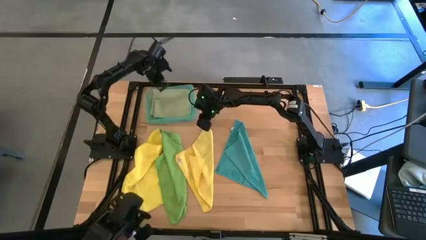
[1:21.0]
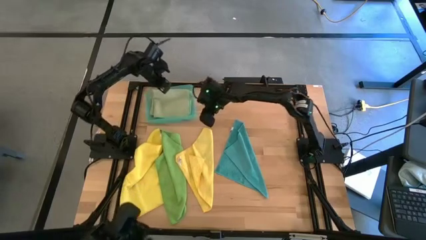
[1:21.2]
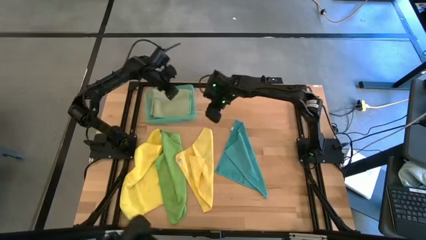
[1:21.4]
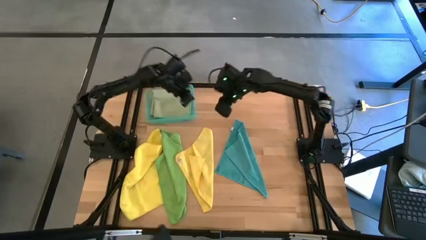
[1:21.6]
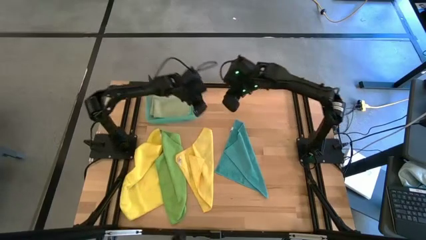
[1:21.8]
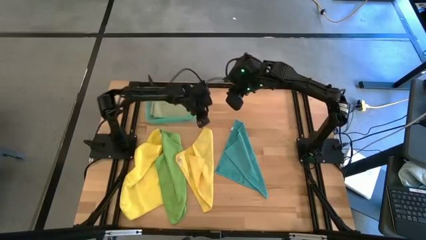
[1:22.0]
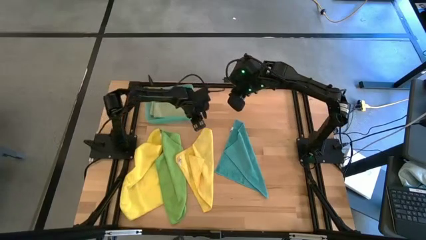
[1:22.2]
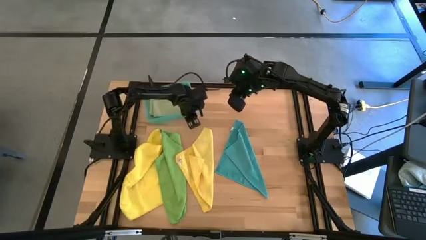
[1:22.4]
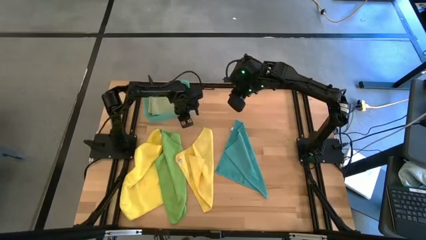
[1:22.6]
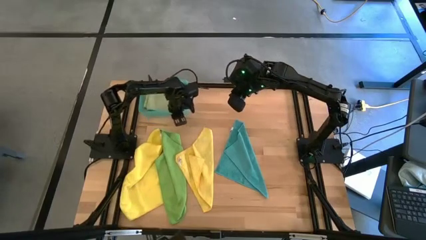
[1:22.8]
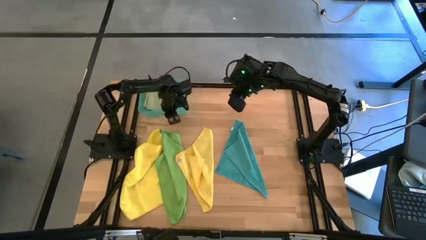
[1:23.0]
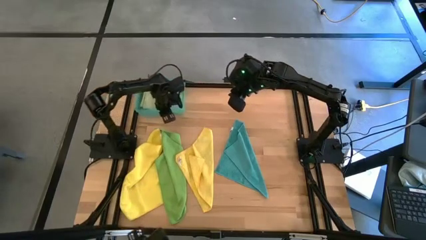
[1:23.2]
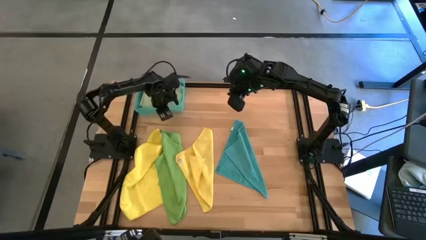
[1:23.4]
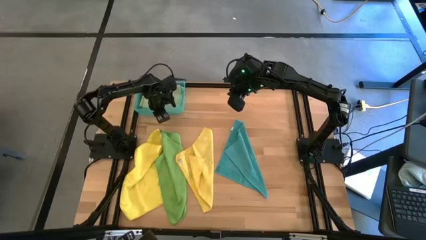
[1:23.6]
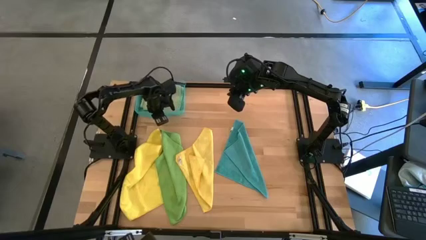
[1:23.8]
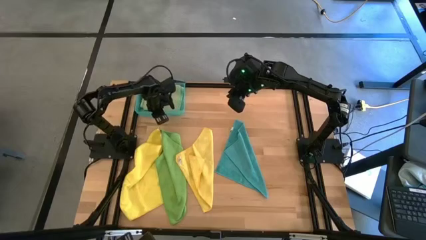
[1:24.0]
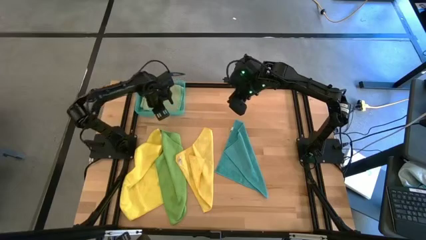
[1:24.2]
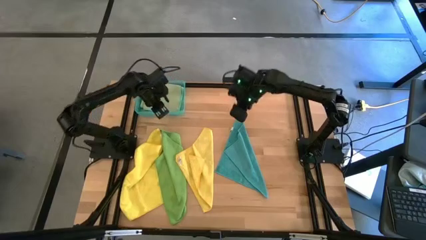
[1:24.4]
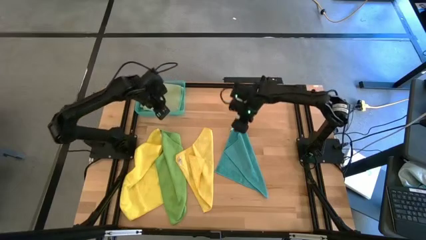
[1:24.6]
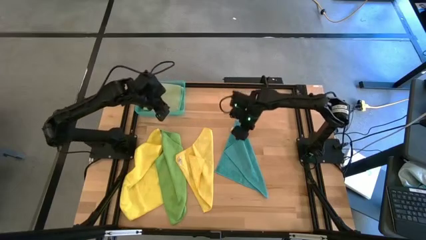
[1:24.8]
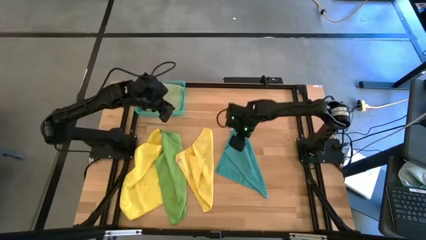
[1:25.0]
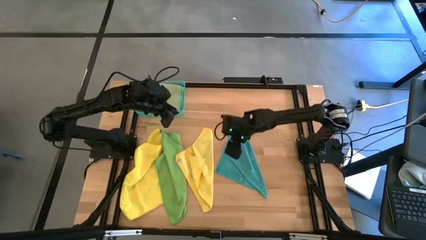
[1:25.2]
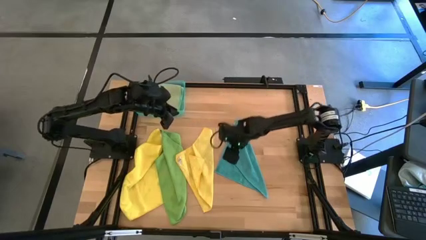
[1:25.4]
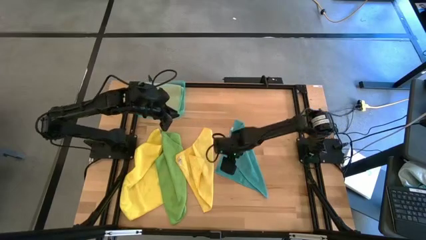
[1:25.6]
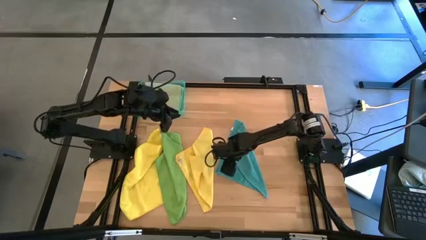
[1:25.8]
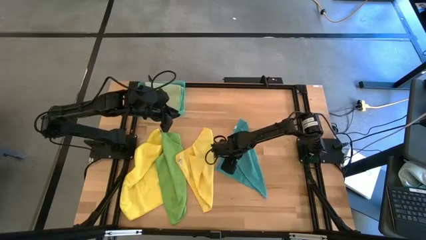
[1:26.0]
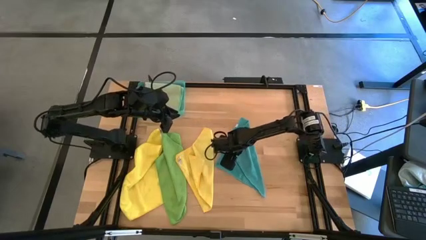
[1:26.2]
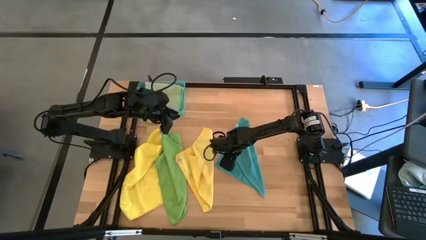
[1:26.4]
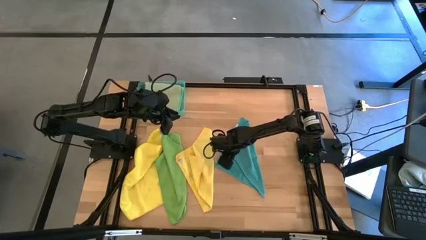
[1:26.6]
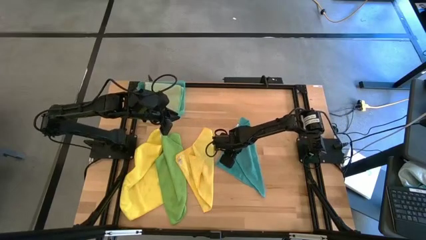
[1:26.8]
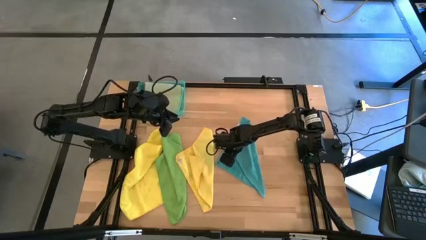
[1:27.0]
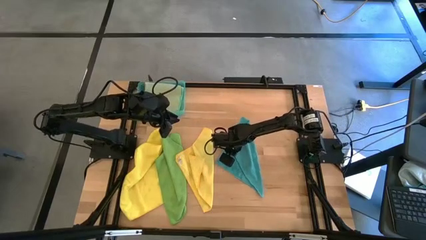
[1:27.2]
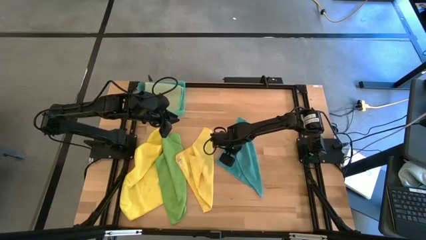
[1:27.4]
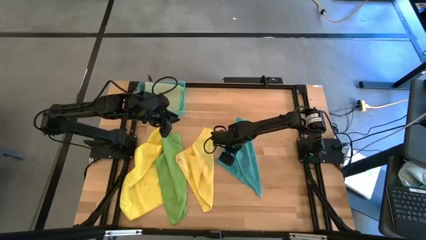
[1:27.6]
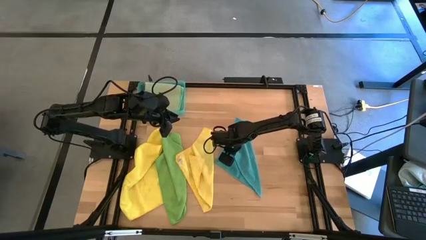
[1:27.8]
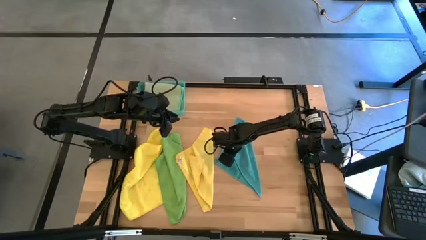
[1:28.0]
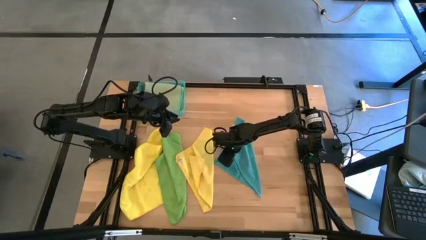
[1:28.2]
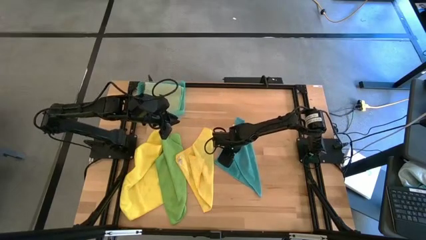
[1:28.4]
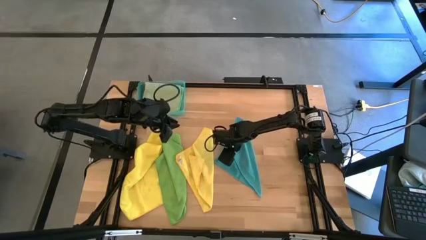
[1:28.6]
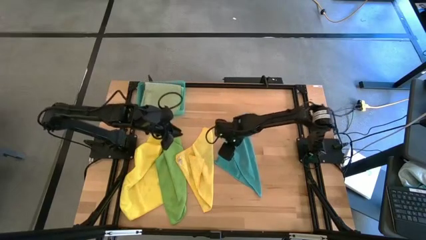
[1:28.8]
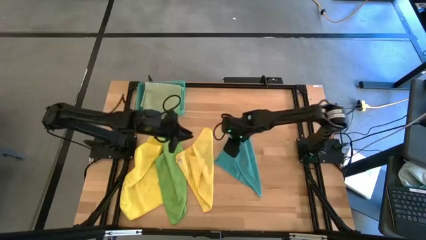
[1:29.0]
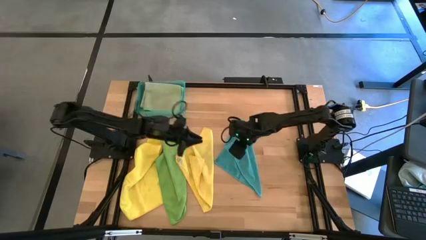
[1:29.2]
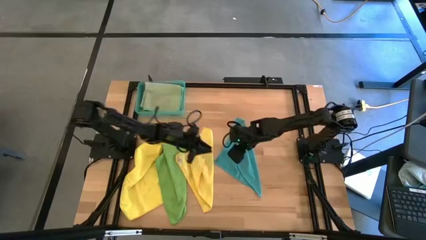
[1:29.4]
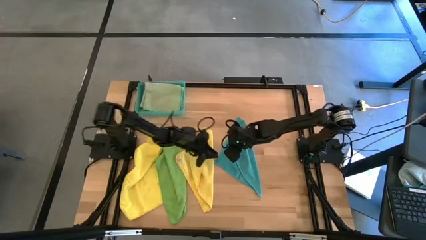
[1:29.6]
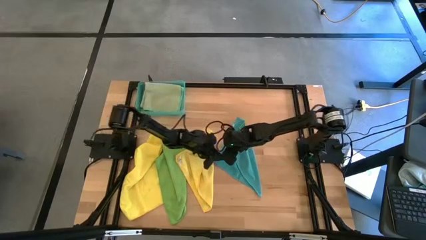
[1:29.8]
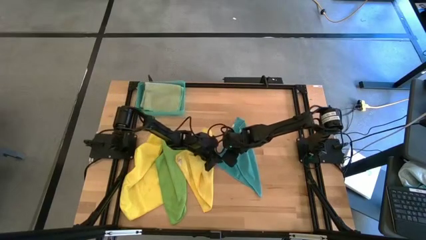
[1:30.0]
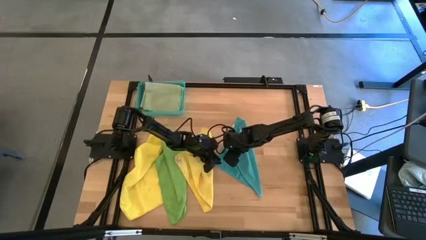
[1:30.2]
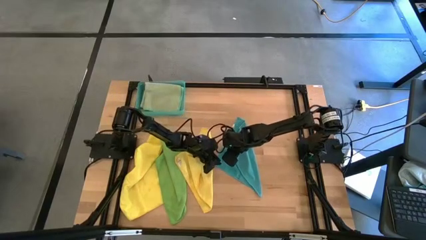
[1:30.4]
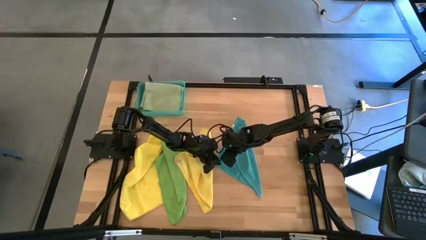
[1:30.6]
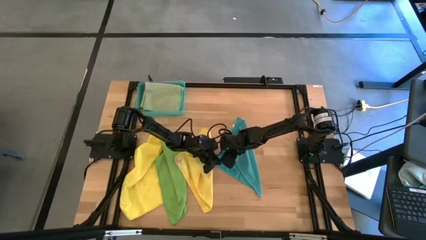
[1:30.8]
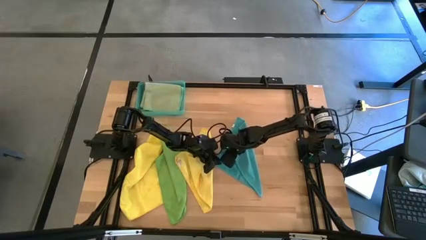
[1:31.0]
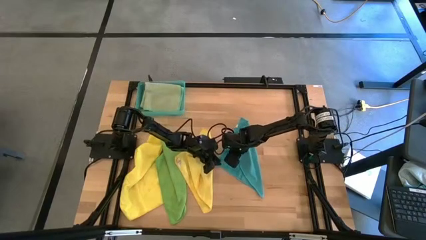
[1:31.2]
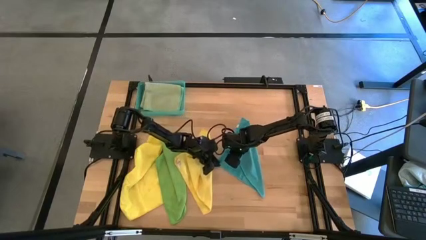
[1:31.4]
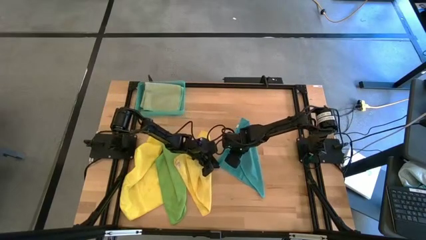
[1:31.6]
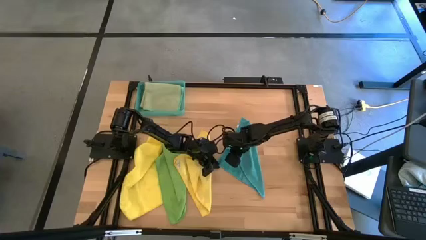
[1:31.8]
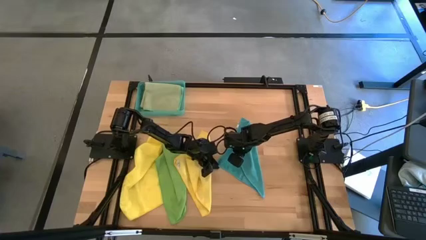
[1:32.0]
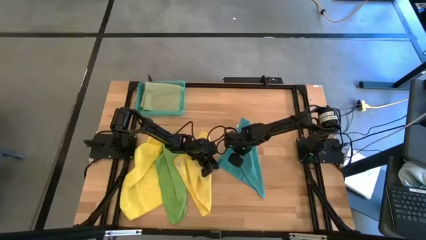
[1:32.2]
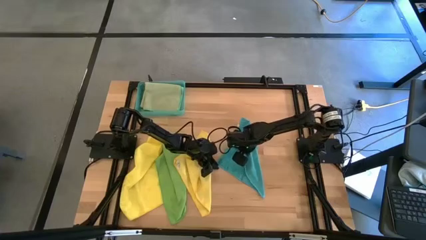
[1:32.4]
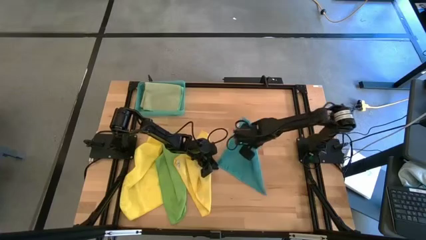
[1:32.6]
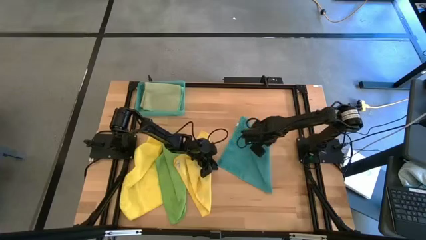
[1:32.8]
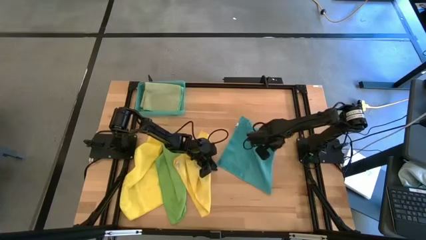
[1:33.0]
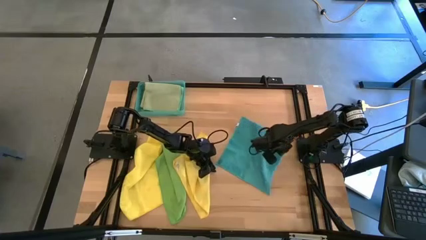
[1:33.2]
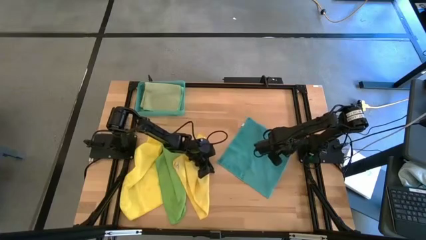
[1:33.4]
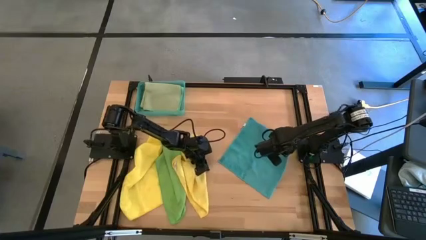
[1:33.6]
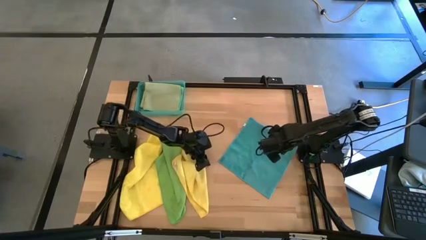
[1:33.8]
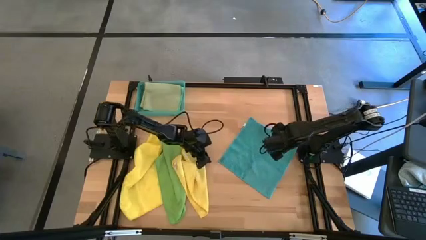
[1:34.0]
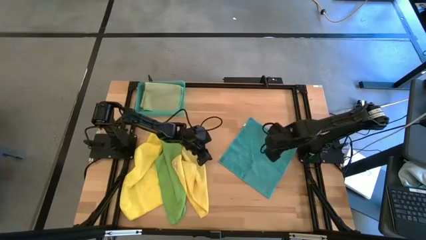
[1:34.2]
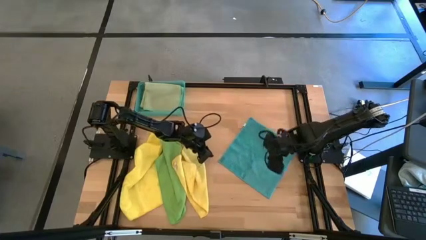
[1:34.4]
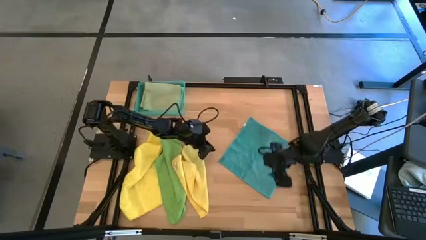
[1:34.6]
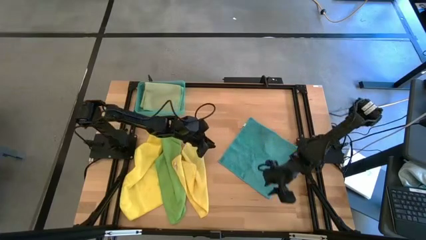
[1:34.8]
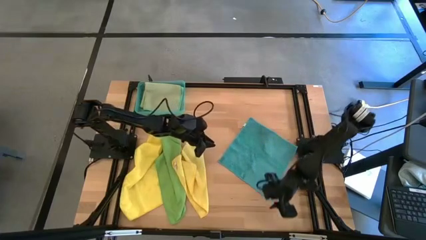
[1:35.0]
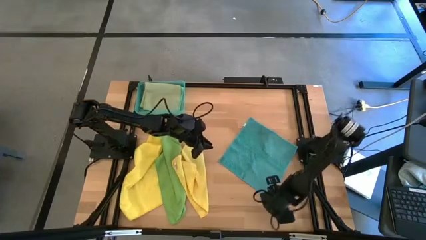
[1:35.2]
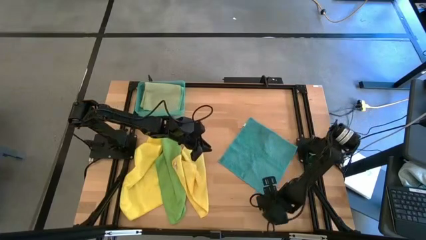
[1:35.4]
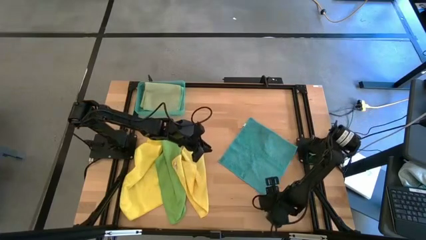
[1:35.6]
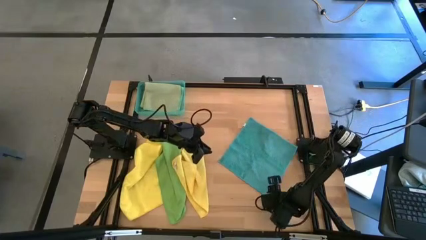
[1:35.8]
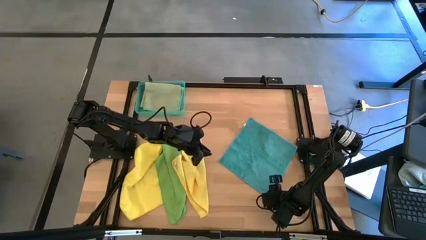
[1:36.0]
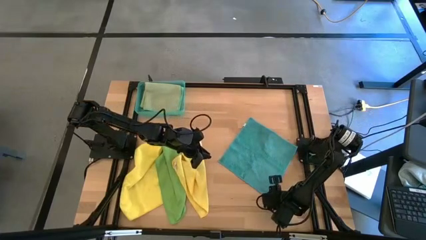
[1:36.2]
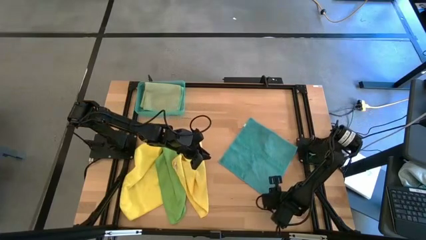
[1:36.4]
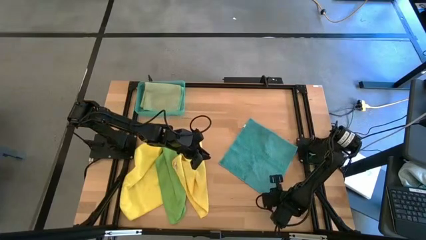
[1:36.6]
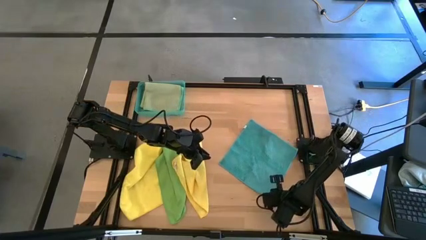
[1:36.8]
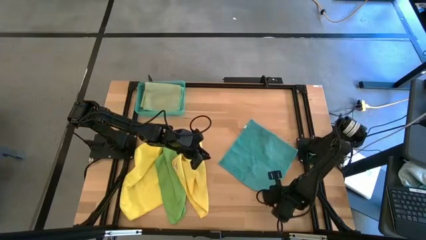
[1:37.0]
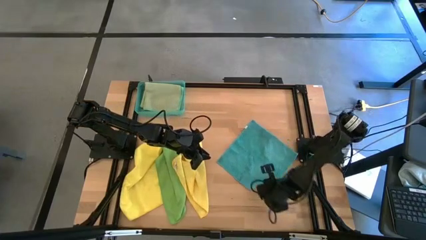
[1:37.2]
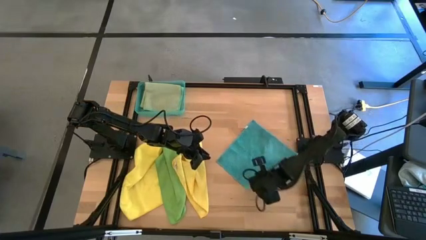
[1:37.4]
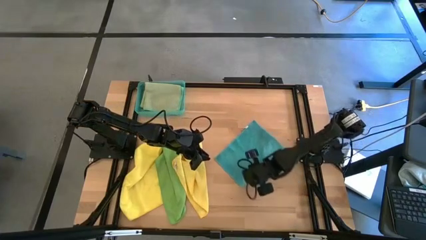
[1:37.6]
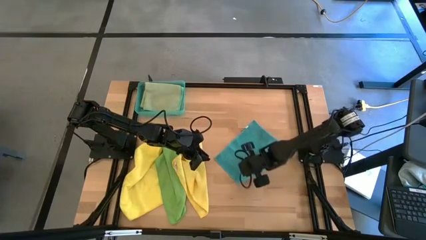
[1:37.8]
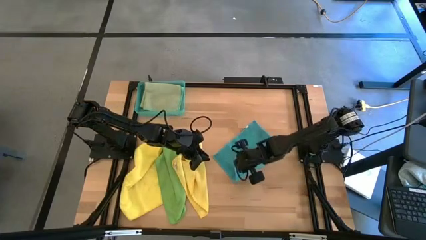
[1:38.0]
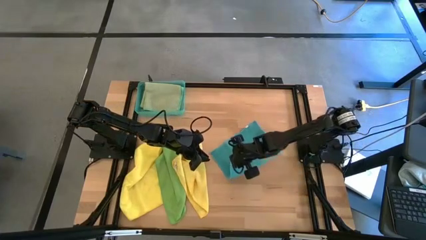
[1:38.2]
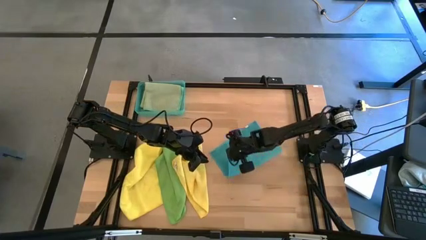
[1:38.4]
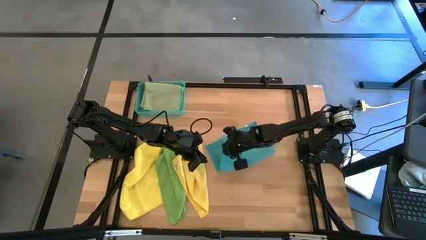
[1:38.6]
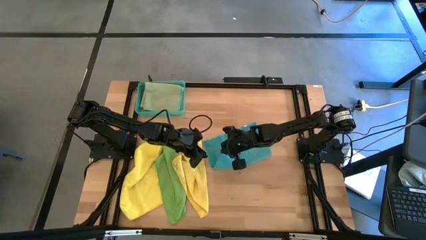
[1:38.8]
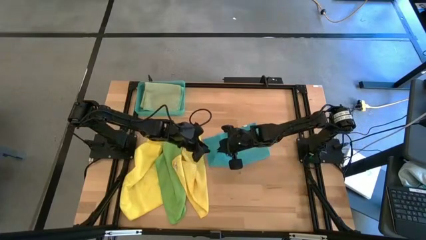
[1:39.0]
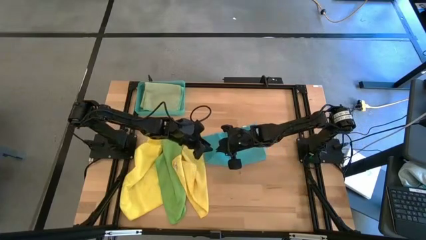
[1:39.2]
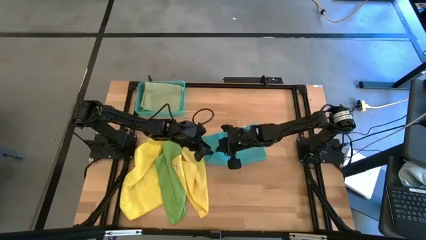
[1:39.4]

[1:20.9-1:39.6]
Task: Fold microfiber towels
Fold the blue microfiber cloth
